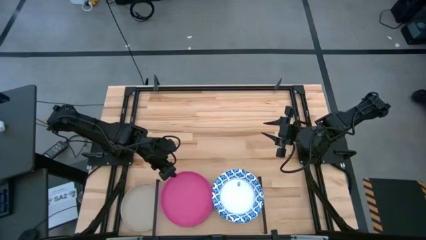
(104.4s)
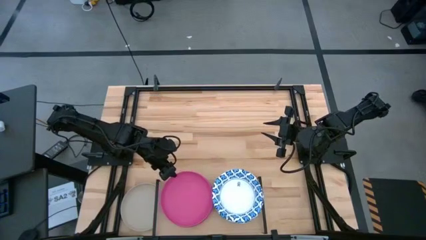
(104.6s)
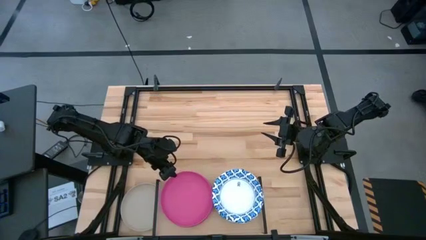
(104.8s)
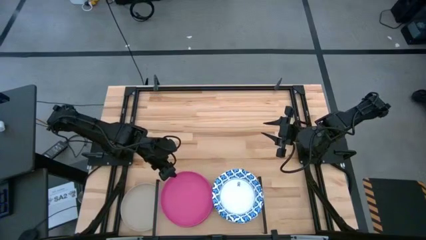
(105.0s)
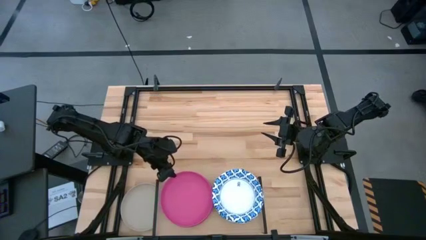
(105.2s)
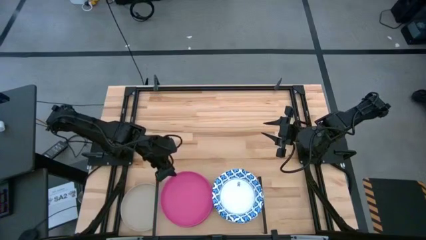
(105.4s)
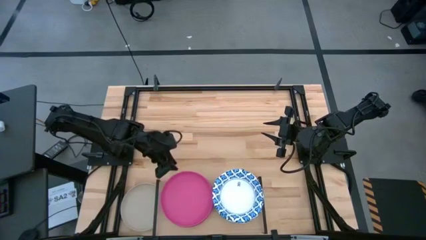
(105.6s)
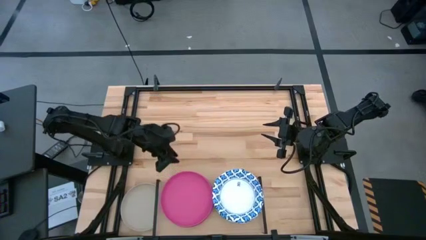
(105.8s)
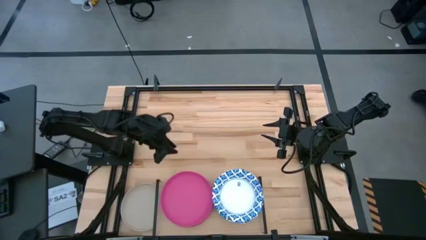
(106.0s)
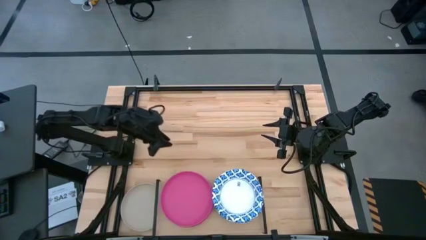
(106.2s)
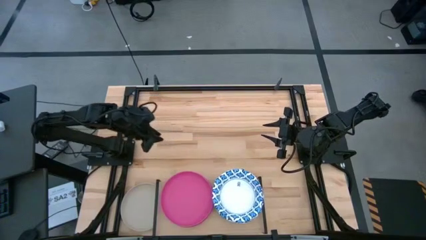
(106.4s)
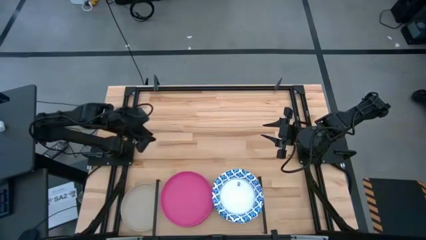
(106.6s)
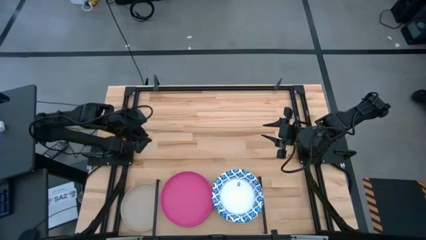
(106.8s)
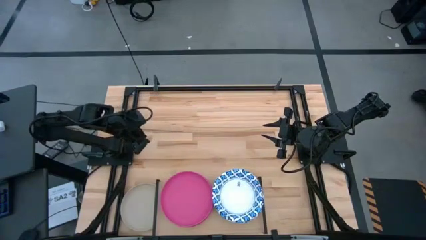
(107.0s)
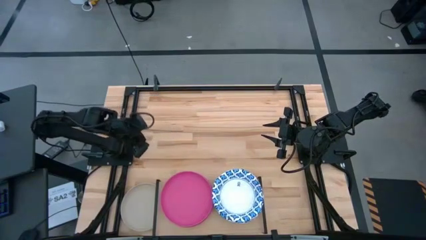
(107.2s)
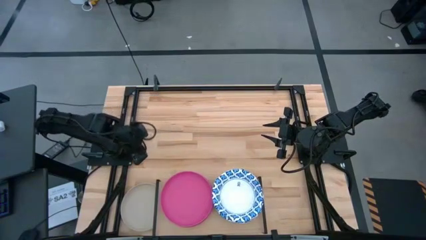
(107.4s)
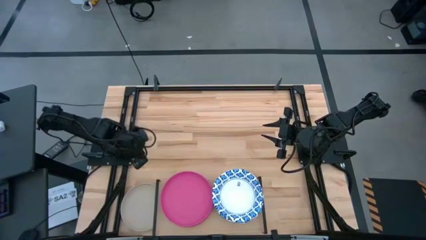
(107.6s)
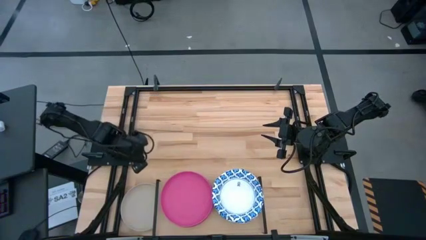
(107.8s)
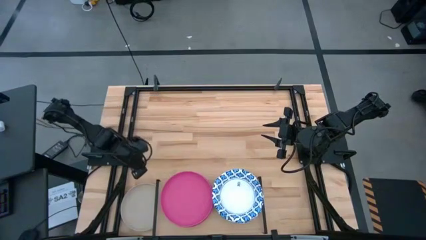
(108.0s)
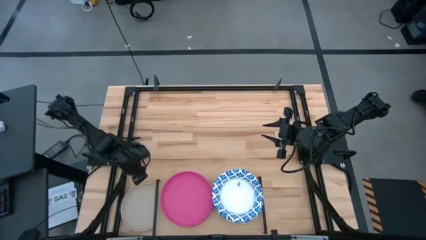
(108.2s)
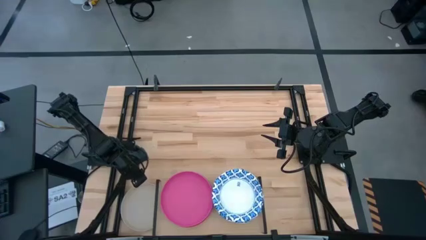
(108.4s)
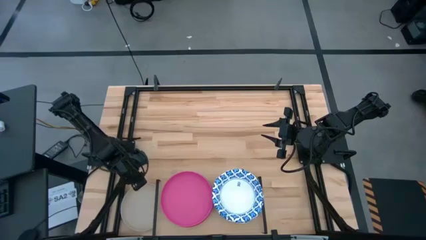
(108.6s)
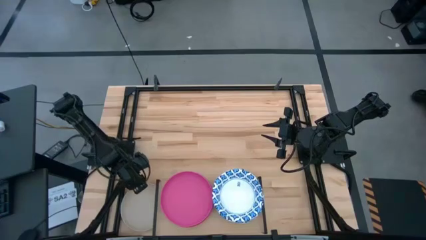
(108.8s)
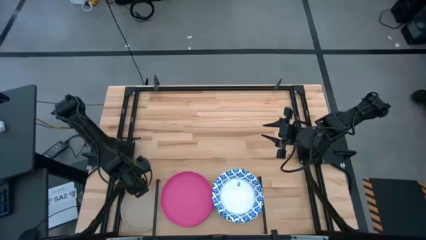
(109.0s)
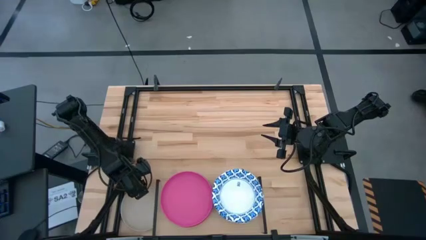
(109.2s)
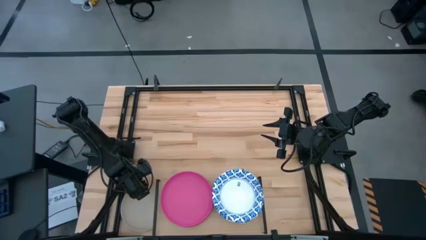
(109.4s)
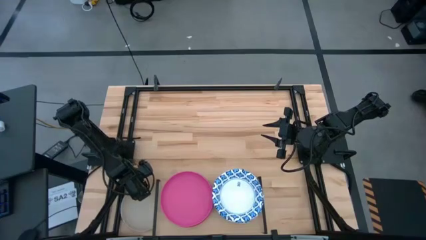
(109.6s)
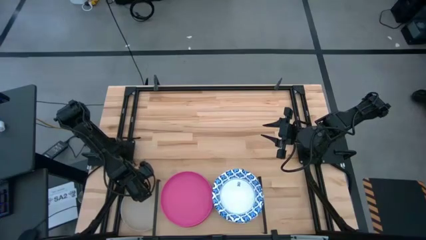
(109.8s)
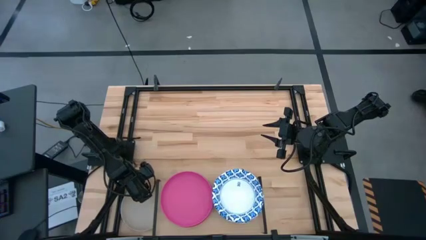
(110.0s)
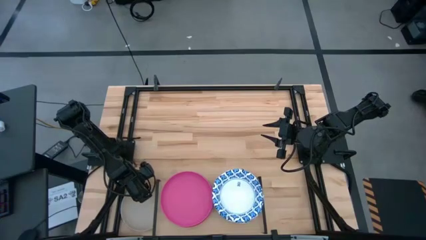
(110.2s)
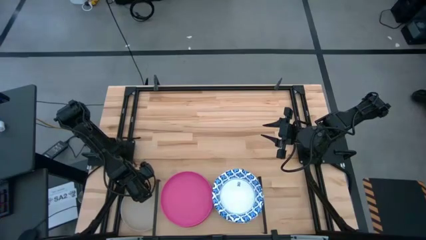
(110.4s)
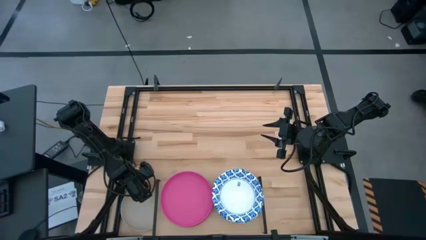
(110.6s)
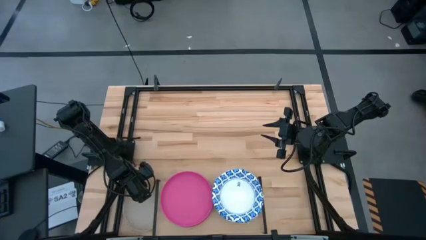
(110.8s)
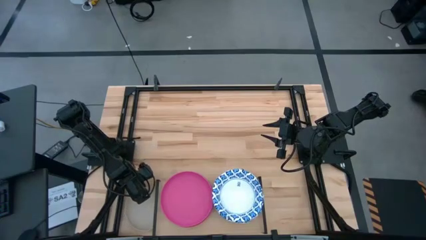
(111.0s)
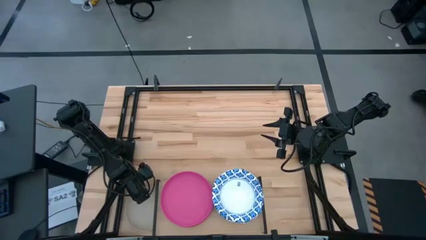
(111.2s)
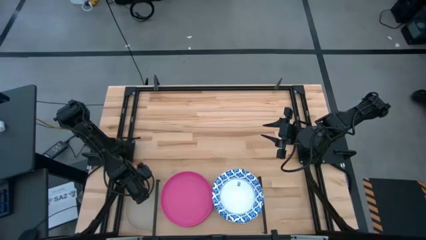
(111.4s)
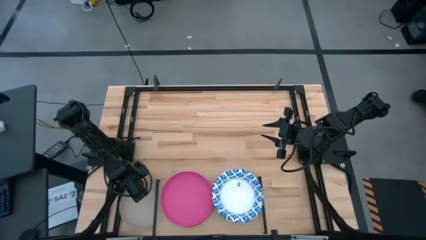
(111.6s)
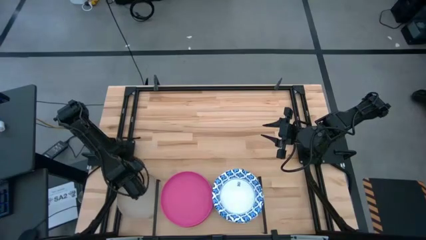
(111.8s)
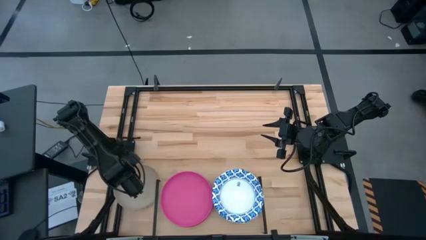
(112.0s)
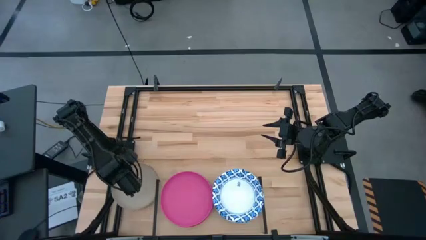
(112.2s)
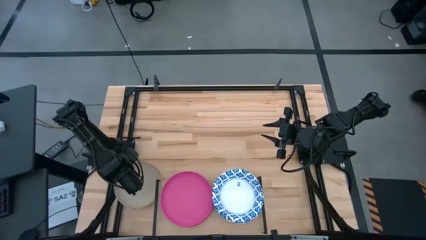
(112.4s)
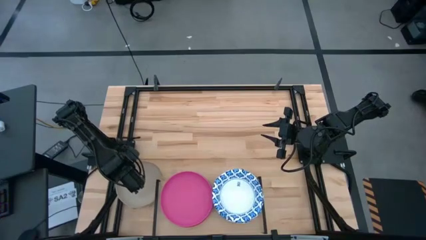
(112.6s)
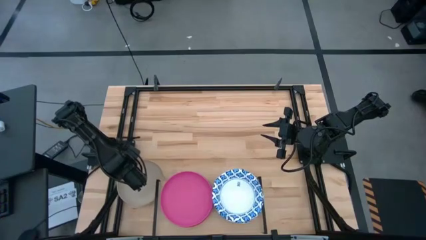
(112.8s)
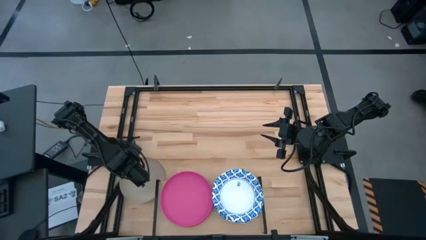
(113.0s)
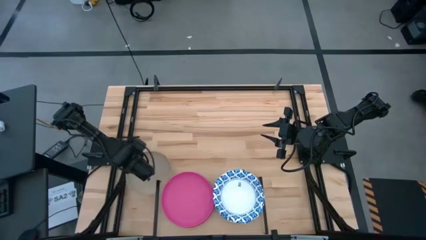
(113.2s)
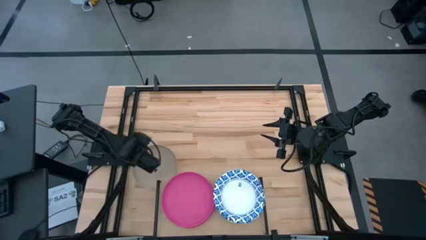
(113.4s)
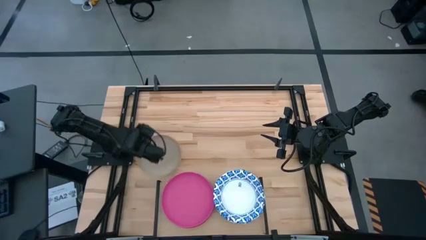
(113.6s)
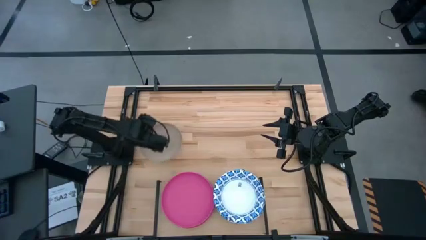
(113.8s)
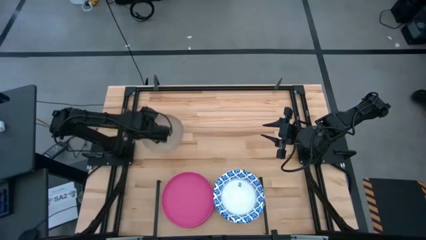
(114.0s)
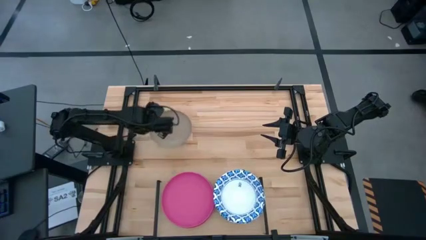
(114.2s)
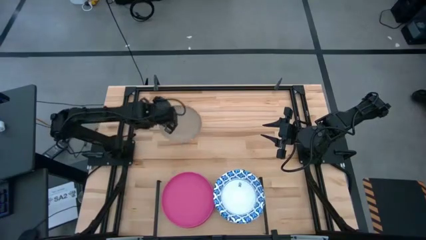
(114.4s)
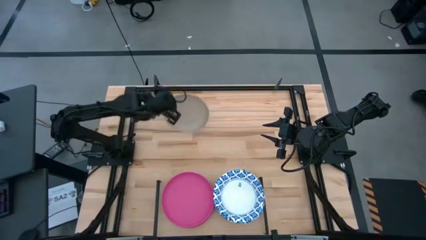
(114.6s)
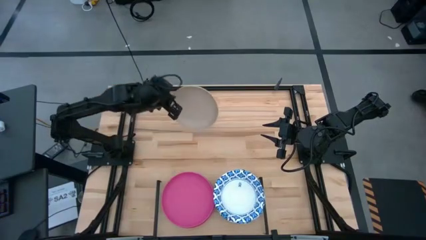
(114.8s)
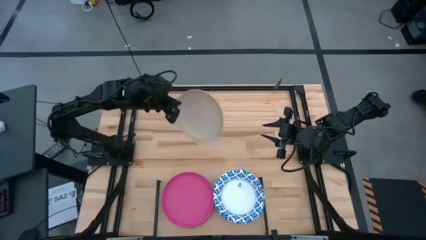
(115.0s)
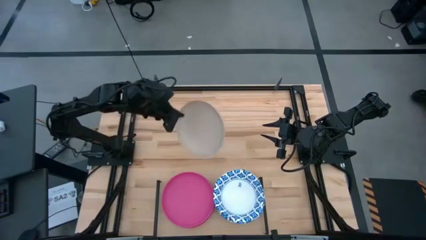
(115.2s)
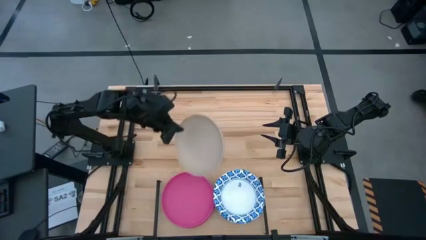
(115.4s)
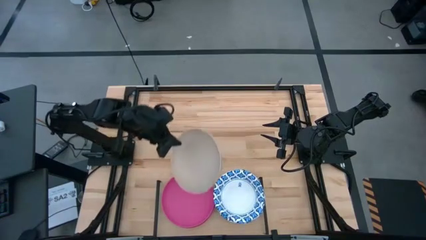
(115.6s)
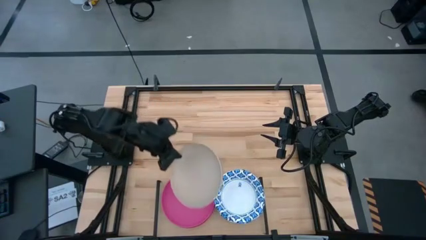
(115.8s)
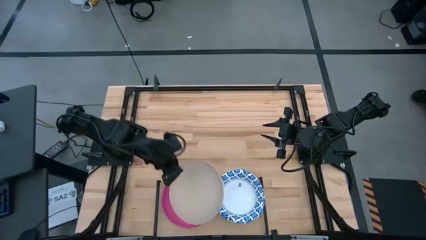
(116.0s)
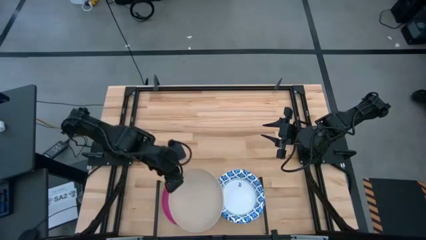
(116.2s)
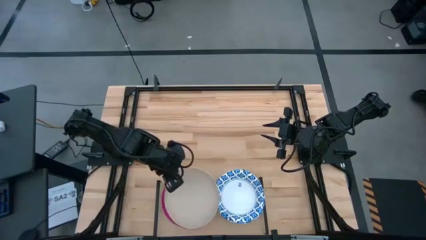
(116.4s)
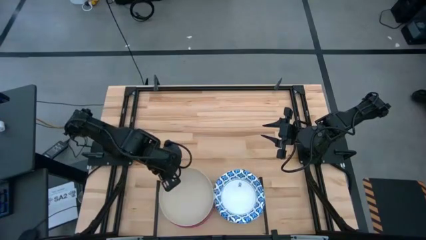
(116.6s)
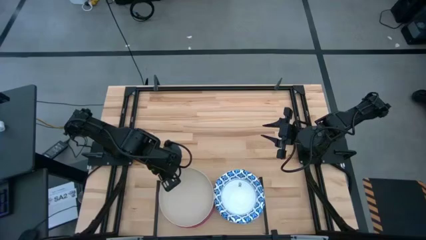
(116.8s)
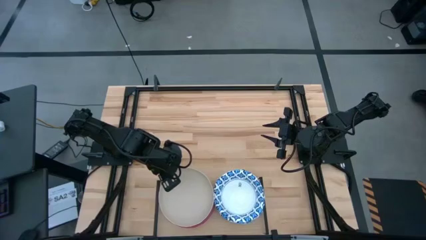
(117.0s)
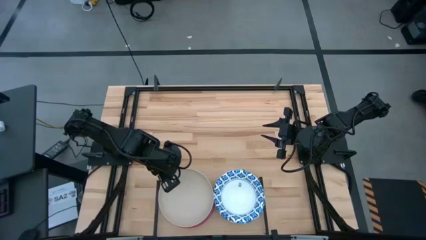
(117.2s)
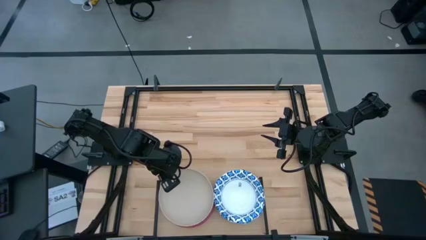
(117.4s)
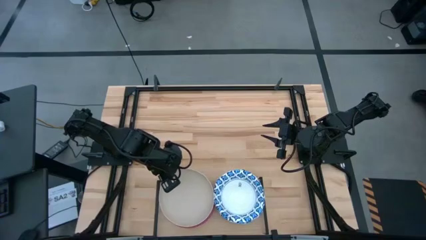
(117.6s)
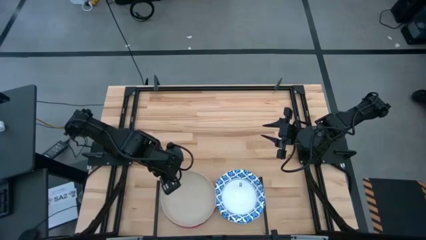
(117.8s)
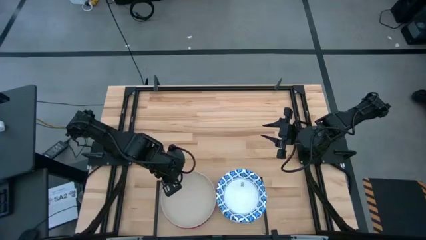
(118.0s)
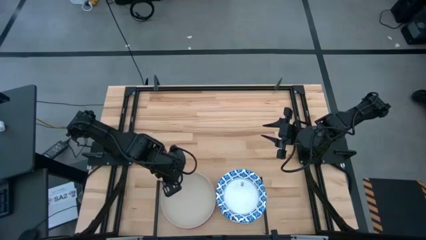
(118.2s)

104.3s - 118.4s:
Task: Place and stack plates onto a shelf
Stack the grey plate on top of the pink plates on the shelf

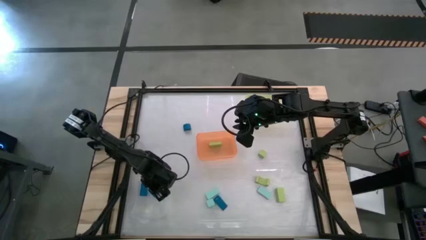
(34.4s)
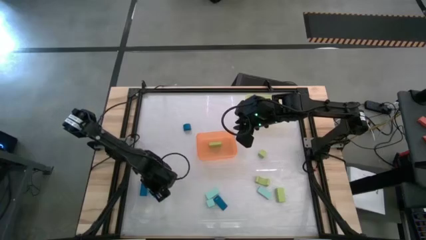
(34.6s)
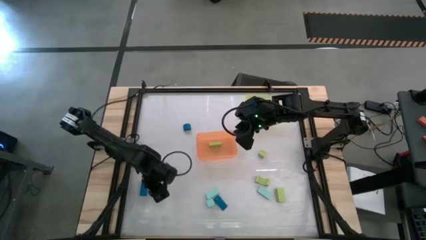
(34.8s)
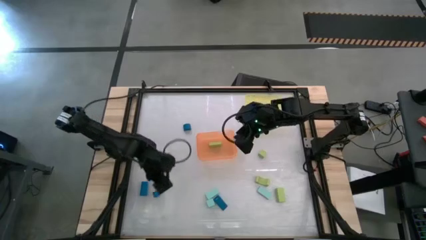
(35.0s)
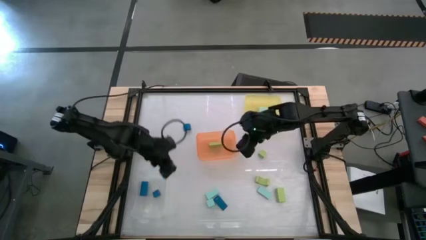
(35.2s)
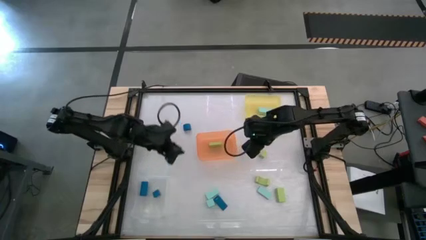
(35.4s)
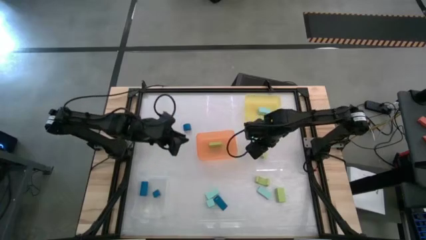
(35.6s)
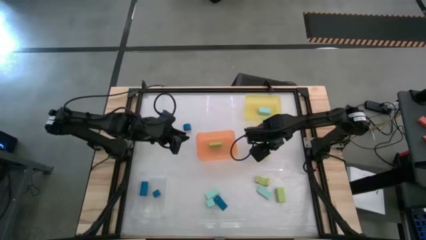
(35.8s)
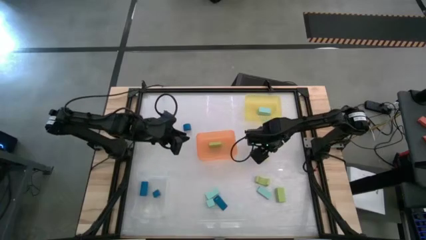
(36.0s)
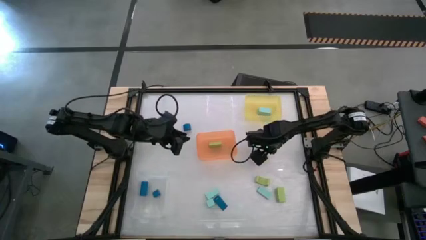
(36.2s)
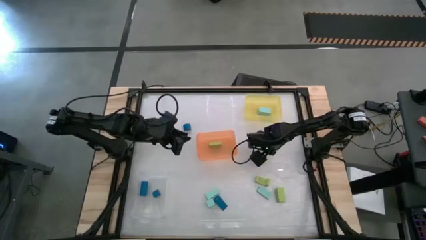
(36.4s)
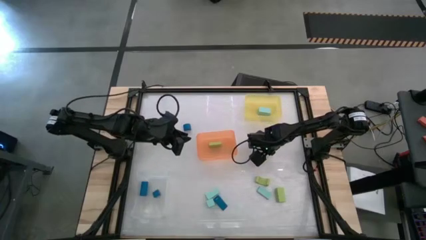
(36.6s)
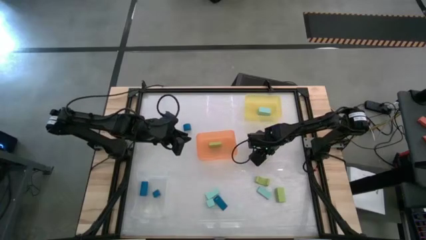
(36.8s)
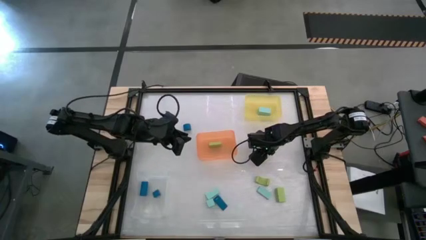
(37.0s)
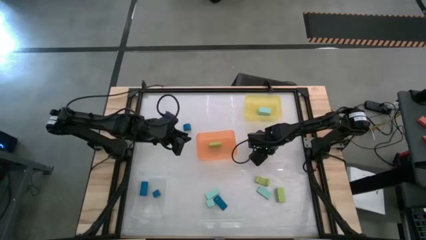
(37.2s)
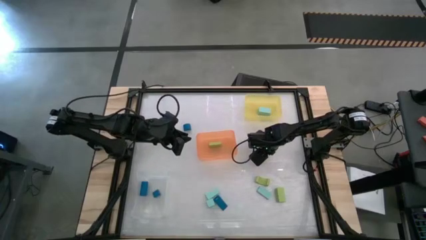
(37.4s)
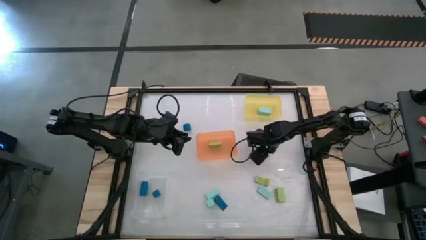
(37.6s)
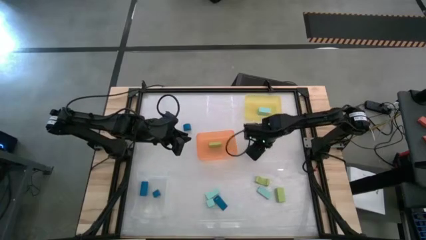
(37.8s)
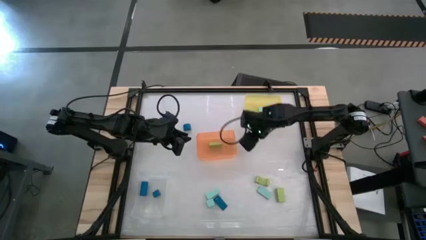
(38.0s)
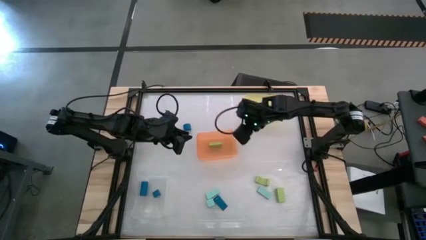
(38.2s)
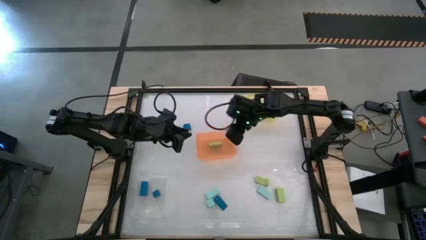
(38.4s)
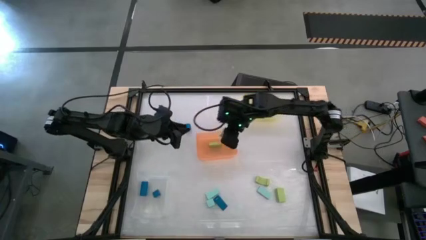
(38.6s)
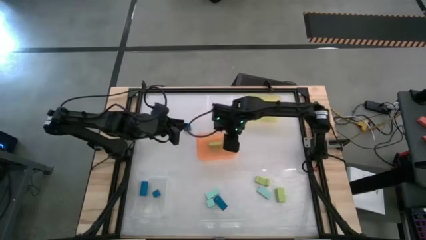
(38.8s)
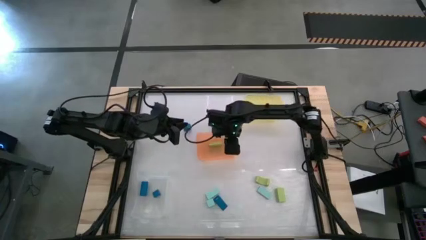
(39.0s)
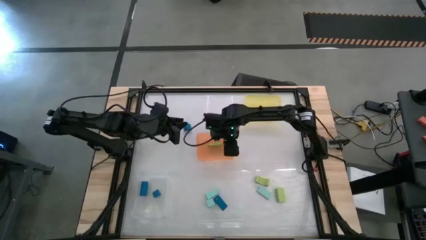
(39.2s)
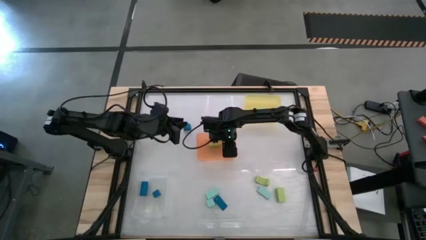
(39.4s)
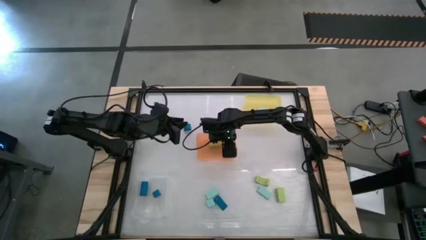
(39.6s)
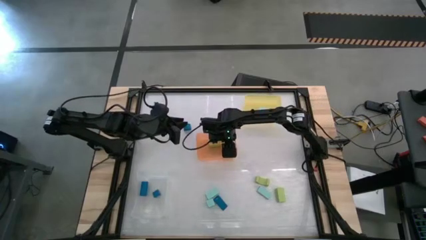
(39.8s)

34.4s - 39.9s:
Task: Sort & place blocks by color
Put the light green block into the orange bin
